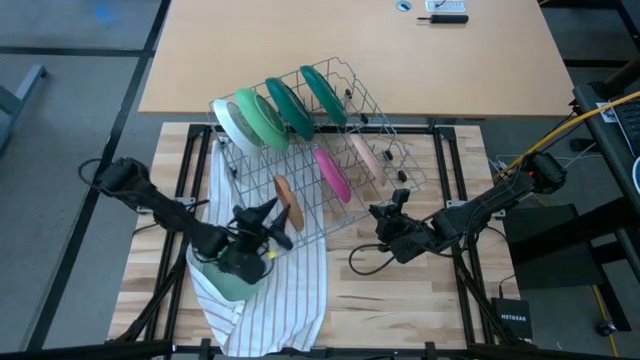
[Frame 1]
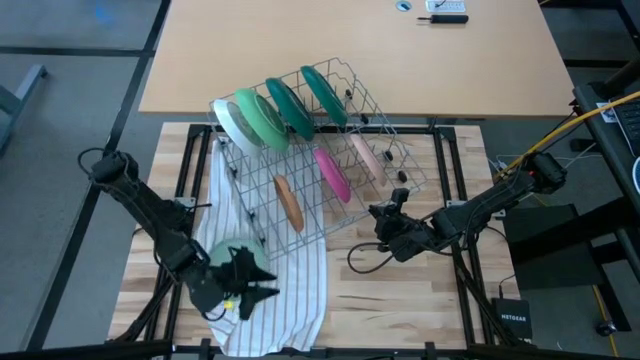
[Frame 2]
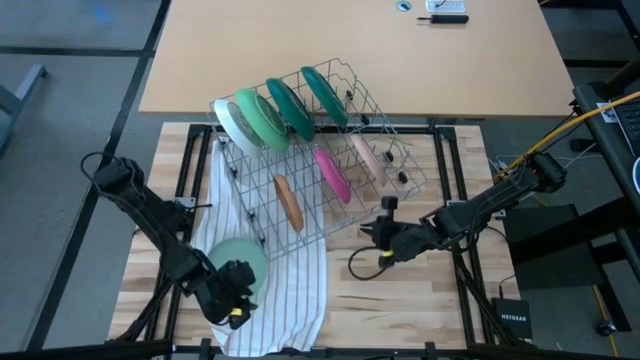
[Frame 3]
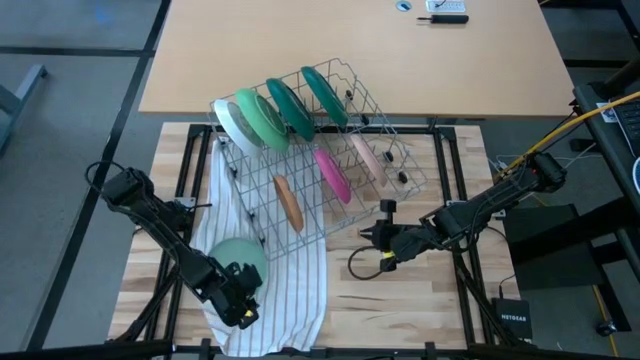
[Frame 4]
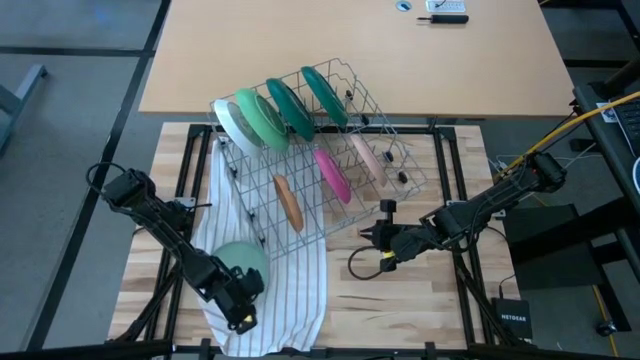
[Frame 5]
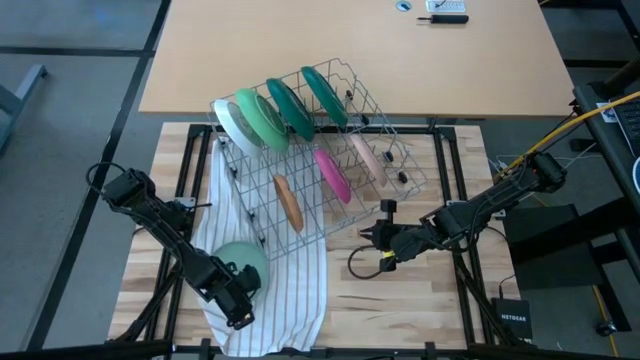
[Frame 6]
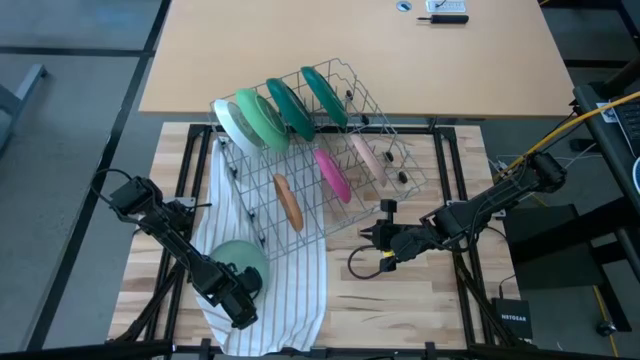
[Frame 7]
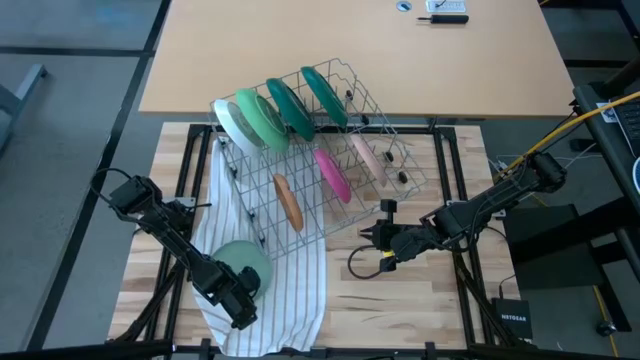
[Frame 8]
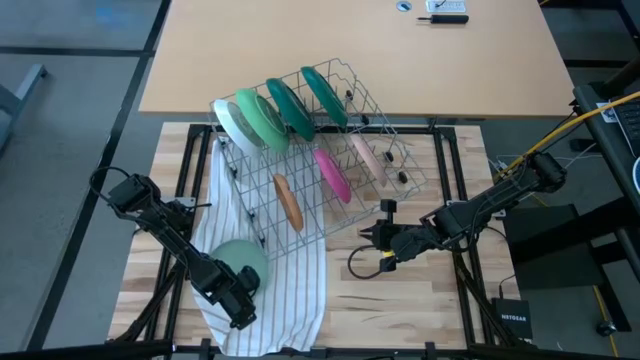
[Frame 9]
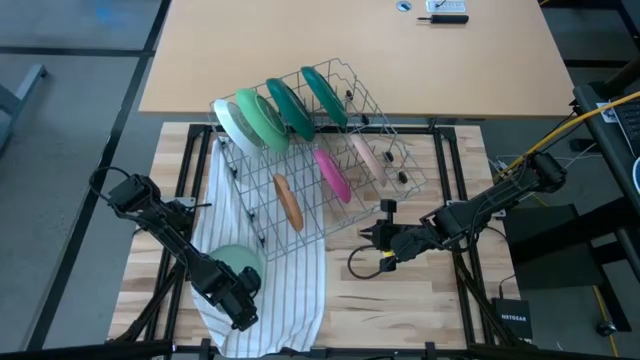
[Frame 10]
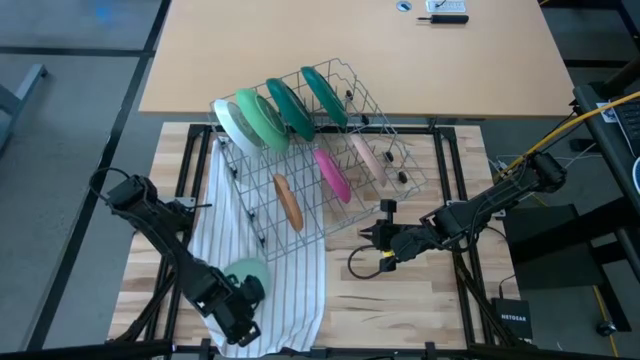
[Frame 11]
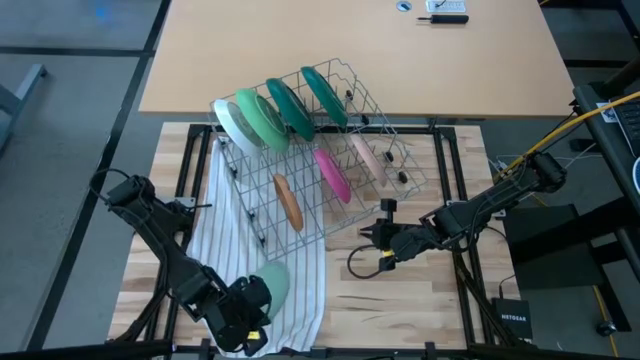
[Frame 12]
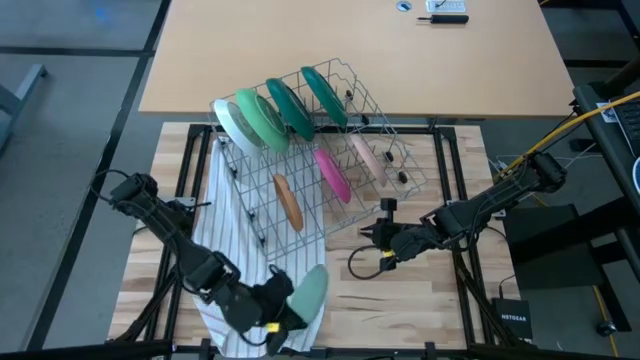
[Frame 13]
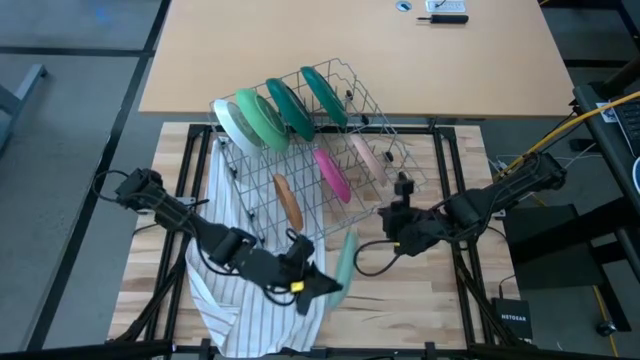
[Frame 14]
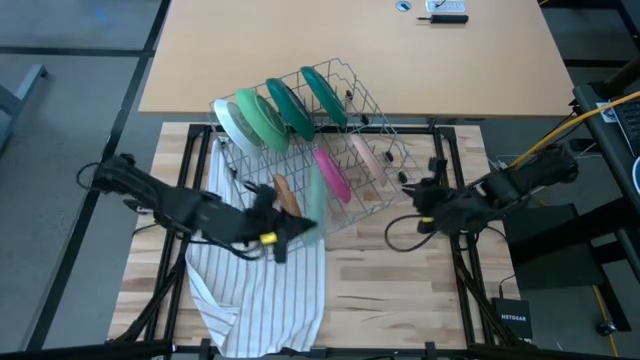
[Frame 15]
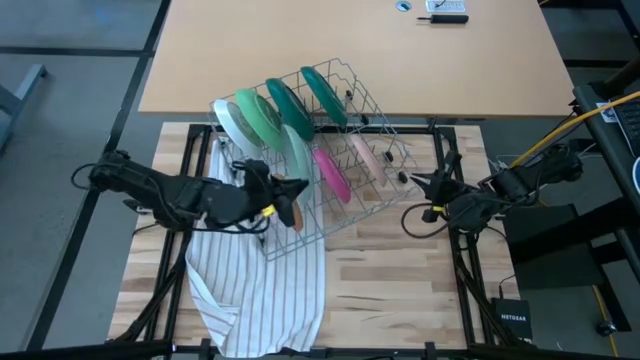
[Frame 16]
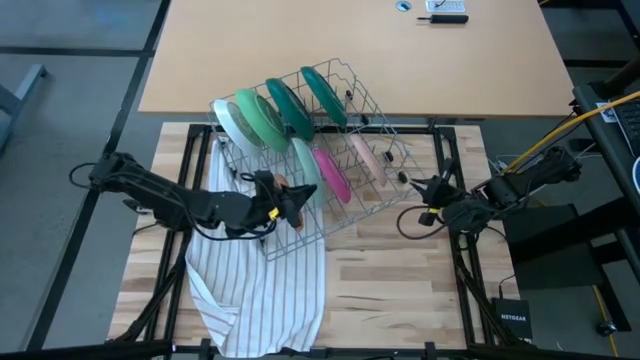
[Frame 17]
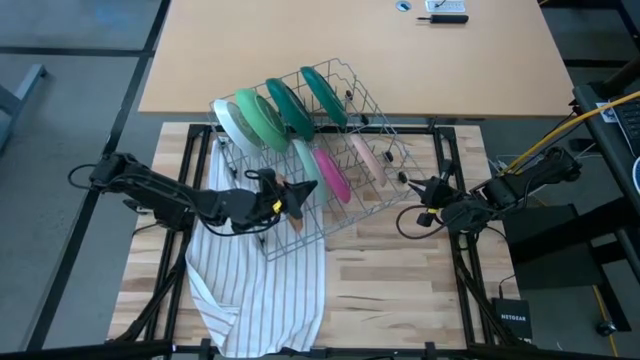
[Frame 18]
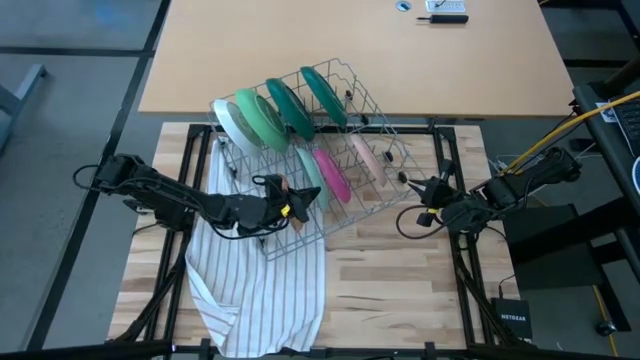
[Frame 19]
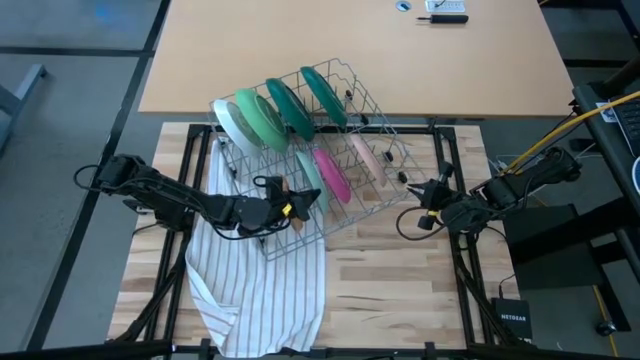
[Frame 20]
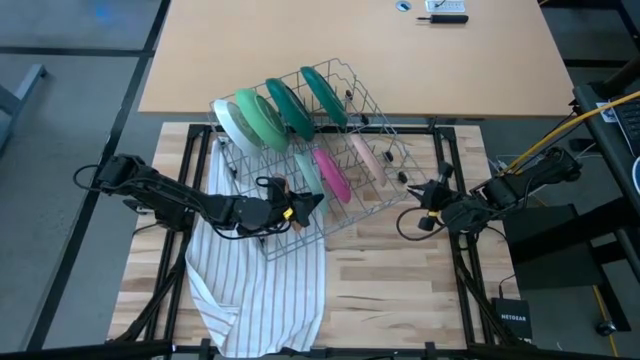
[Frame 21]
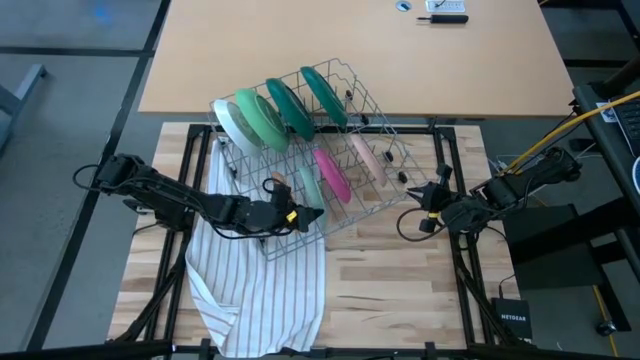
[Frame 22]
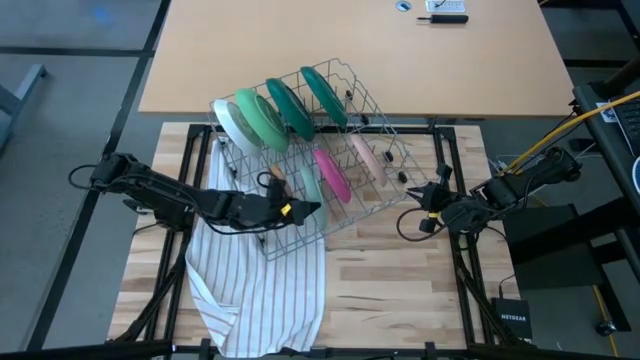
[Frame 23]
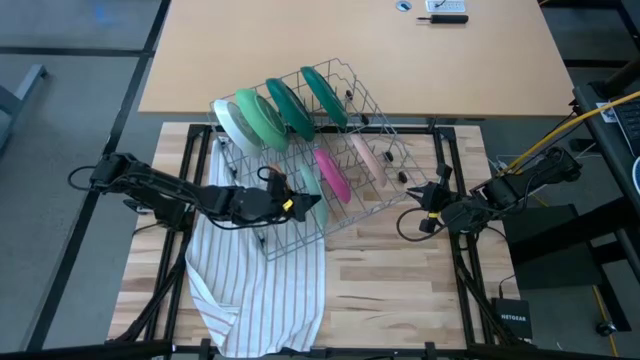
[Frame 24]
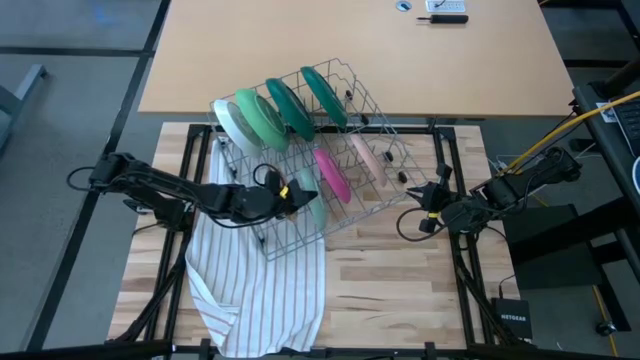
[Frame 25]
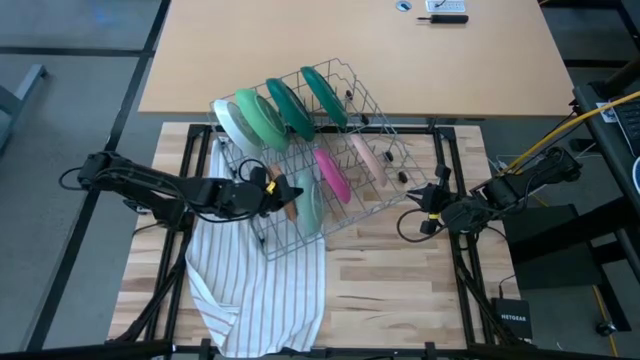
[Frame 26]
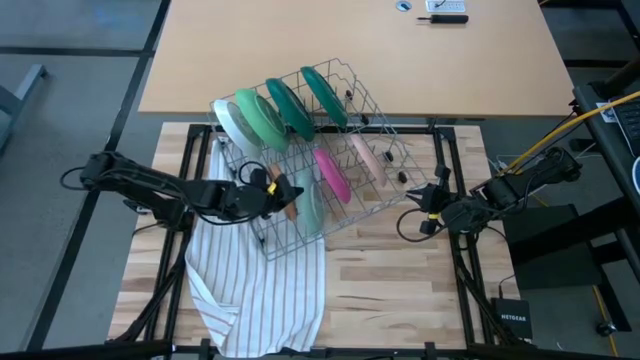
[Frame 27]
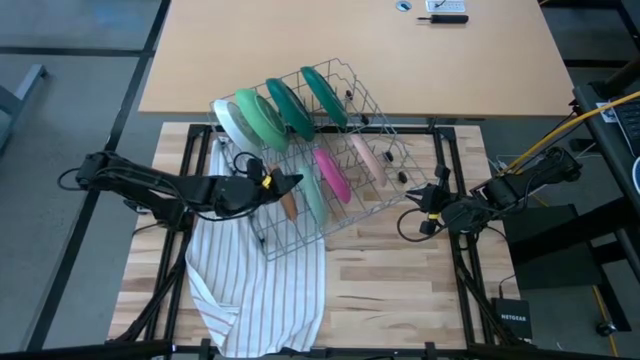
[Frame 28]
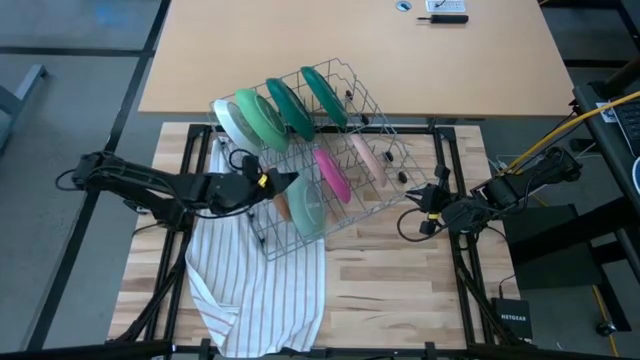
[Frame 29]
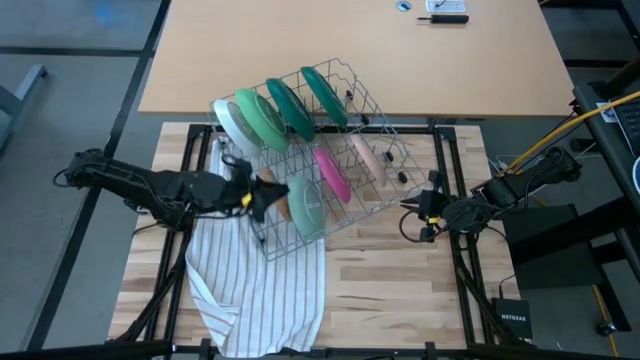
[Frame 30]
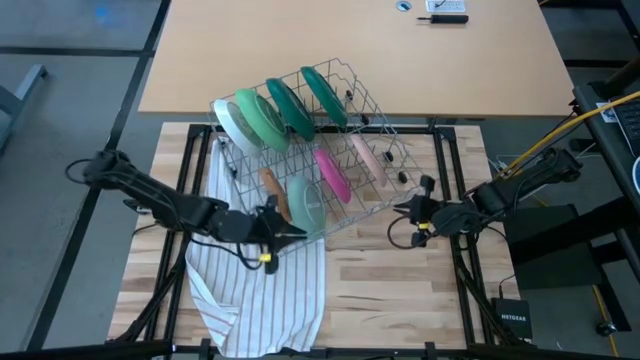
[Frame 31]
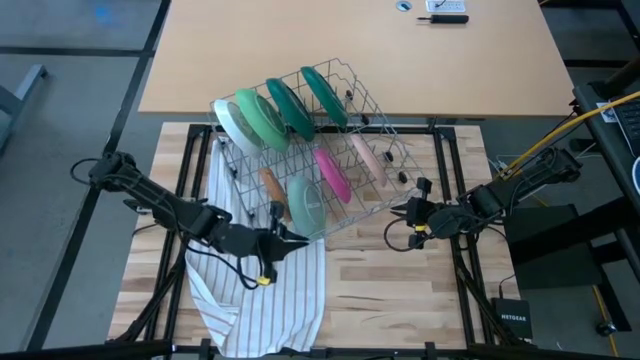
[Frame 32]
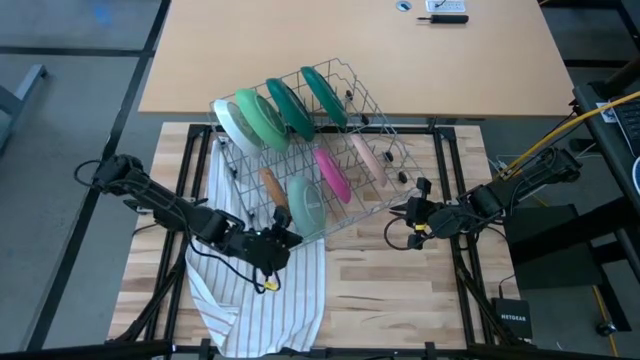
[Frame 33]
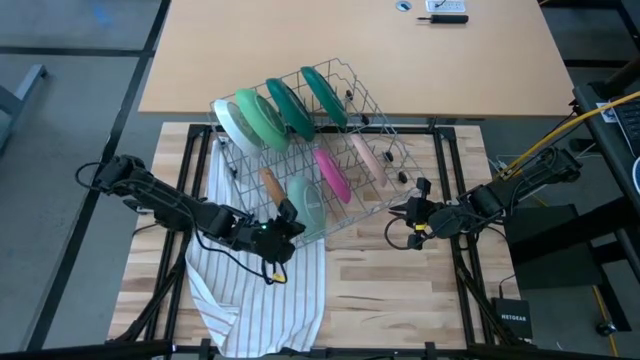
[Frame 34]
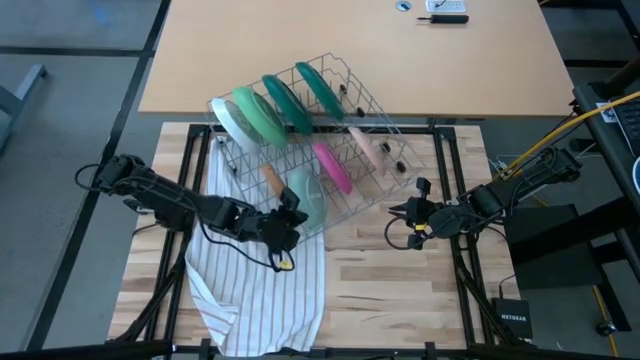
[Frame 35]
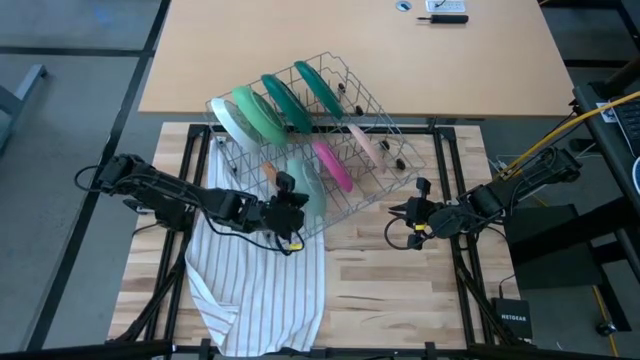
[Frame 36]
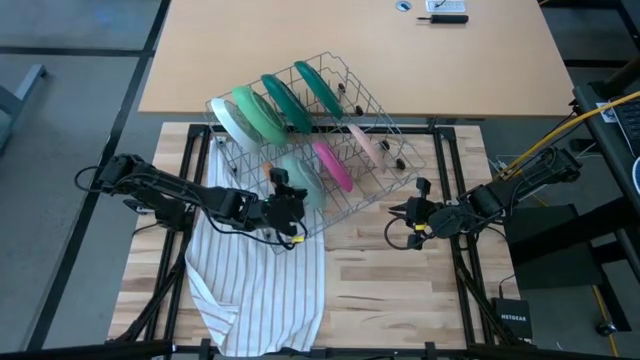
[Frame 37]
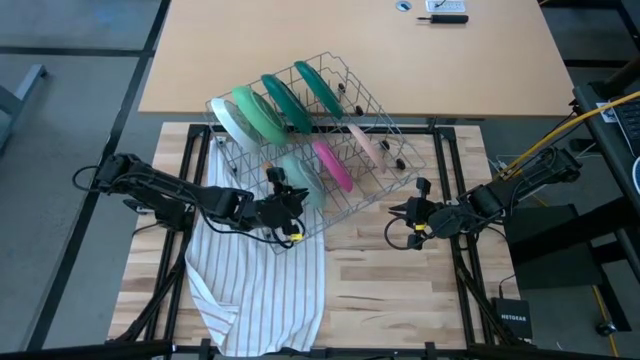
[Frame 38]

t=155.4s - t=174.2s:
Task: Sort dishes
Put the light green plate in the dish rack
